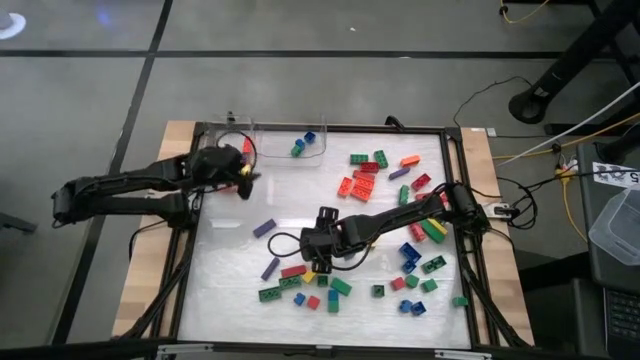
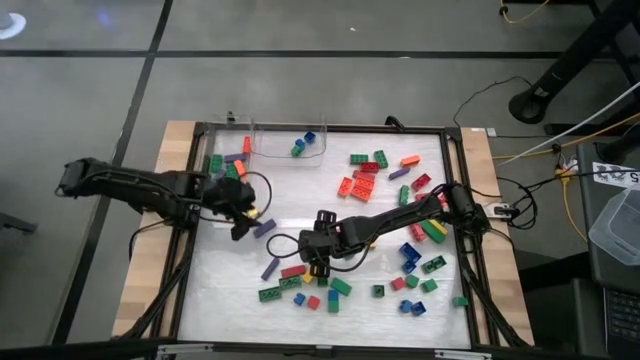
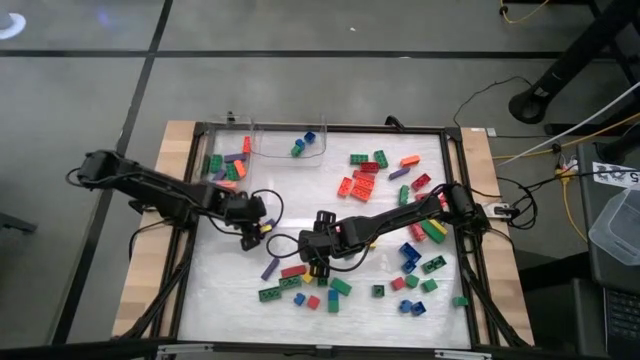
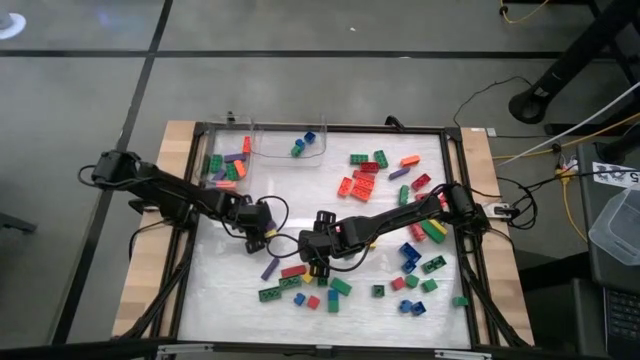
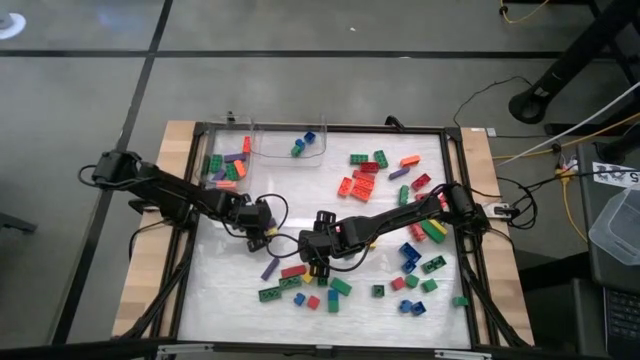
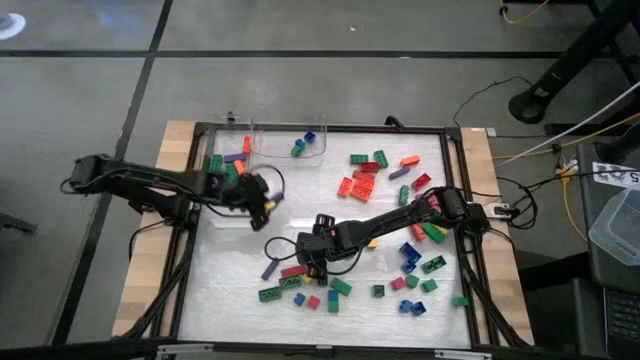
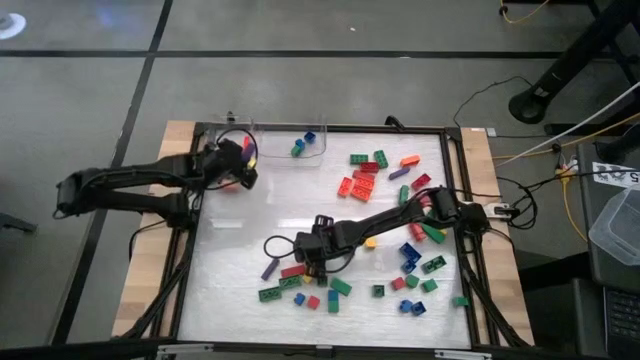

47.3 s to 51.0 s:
Task: Sort blocks by size
Put the large purple block into the left transparent bin

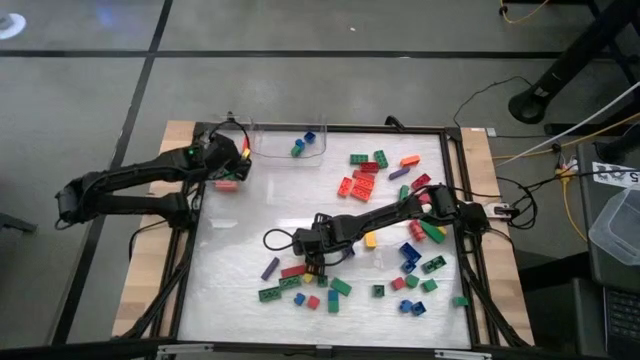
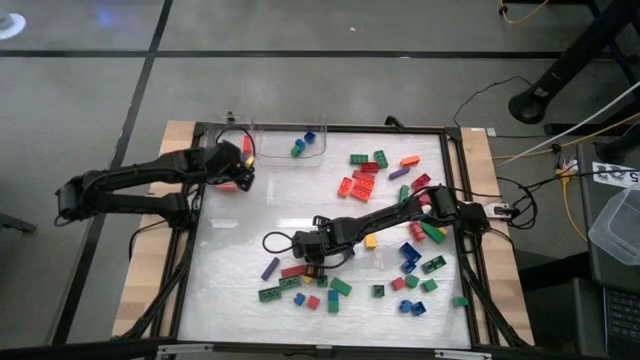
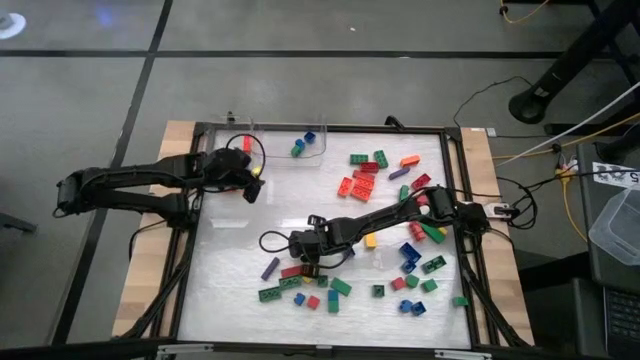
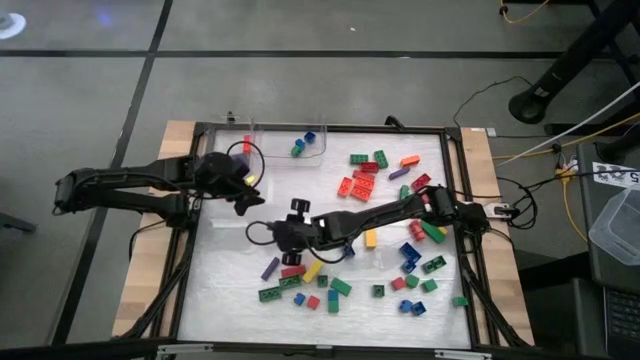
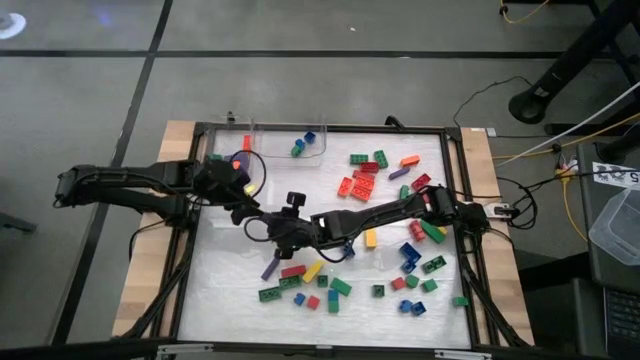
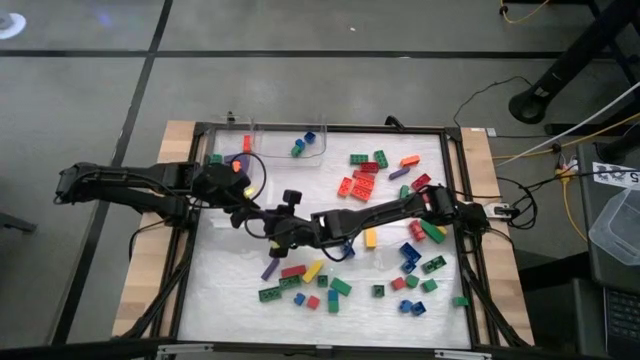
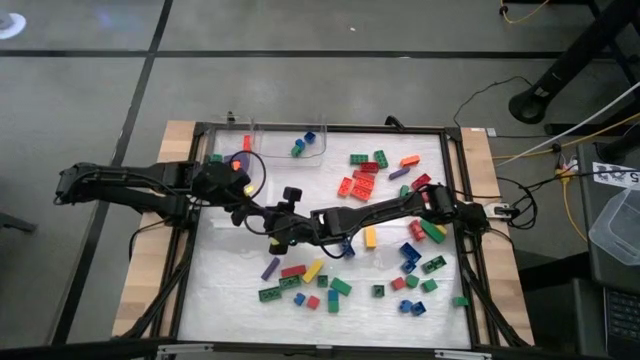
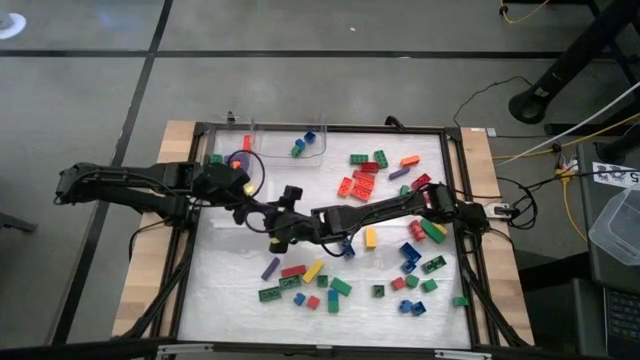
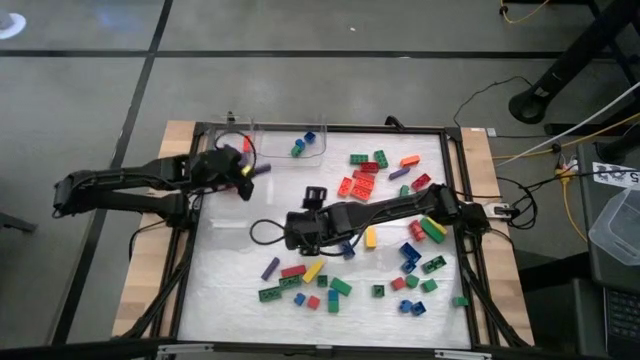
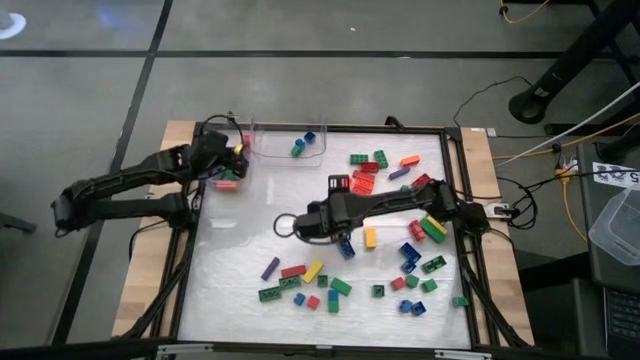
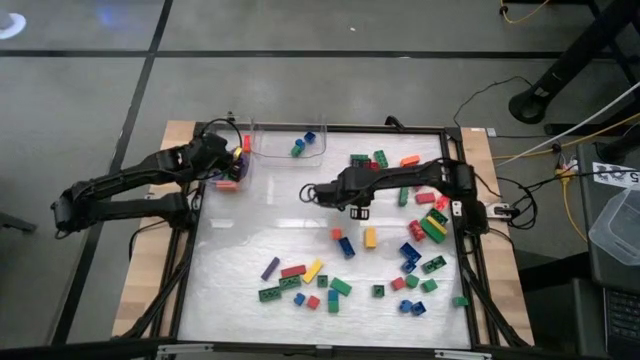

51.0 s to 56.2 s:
Put the large purple block into the left transparent bin

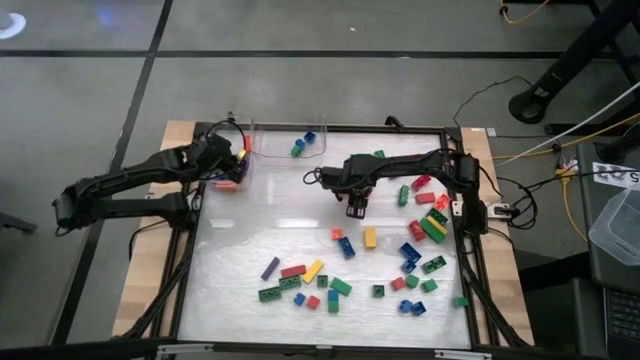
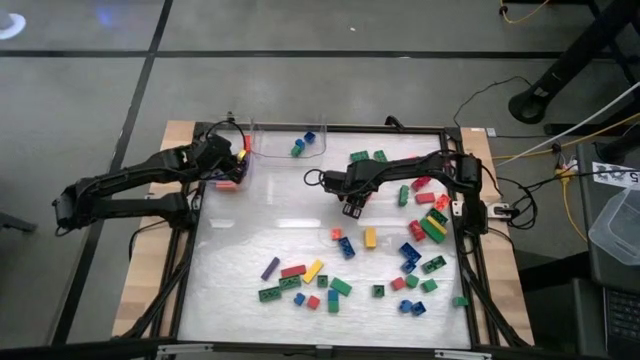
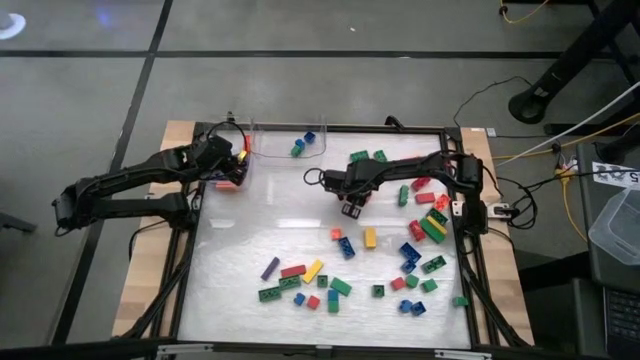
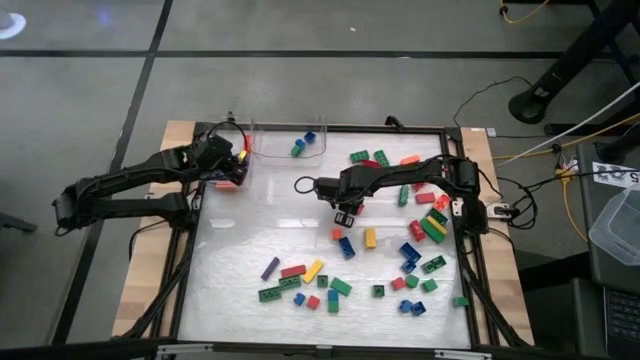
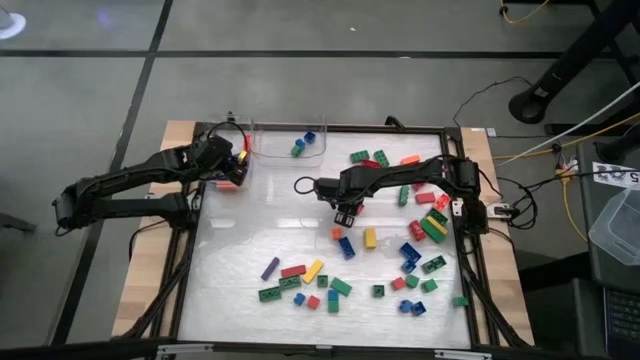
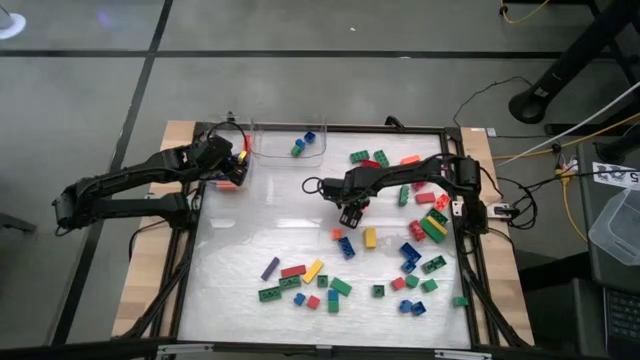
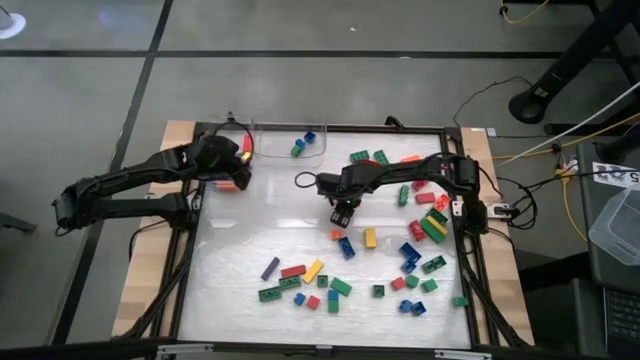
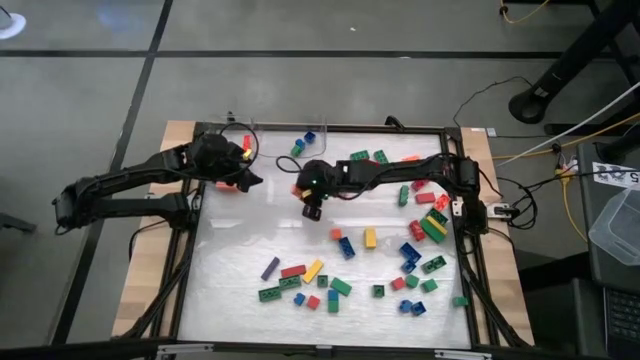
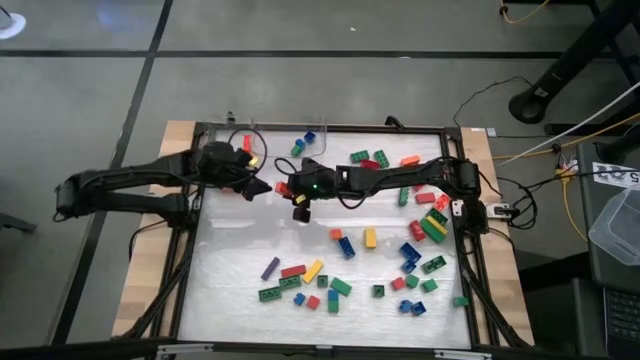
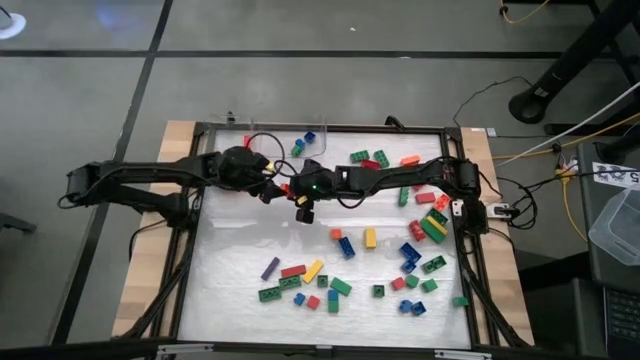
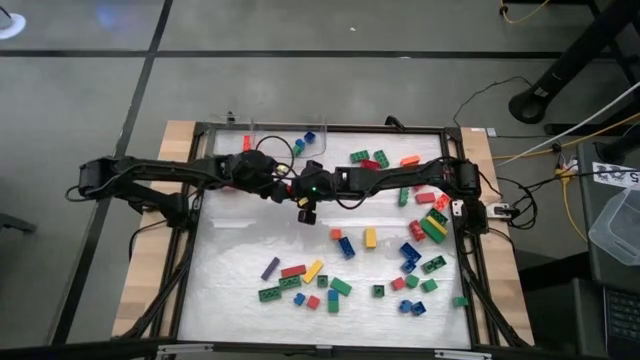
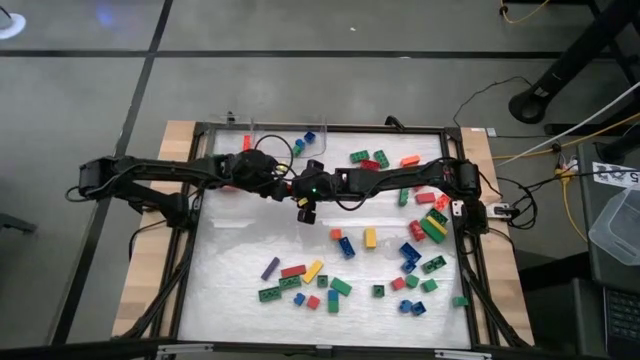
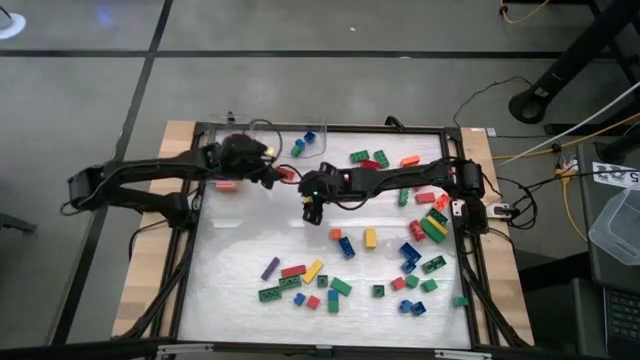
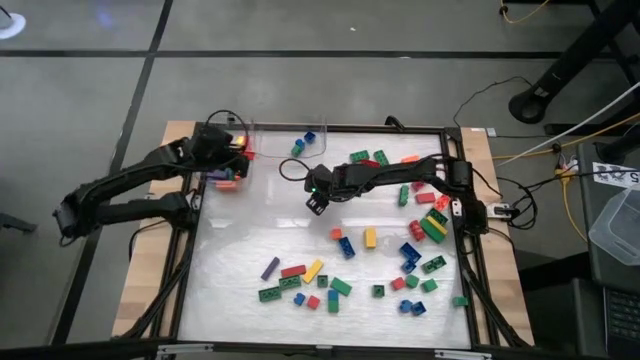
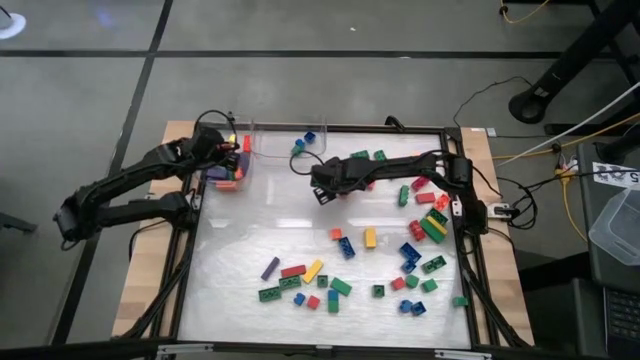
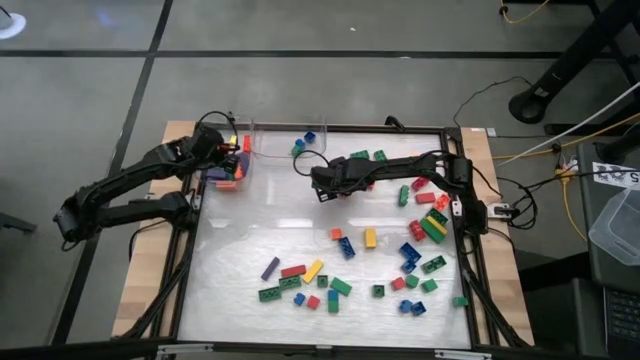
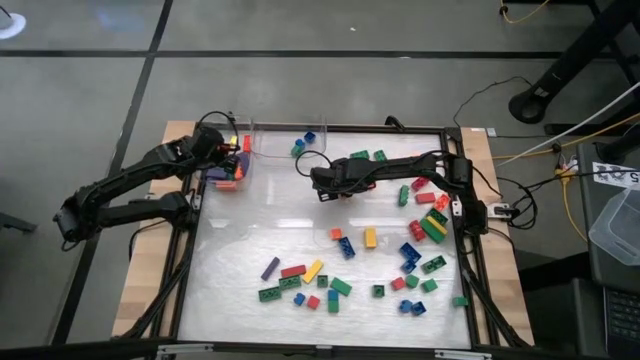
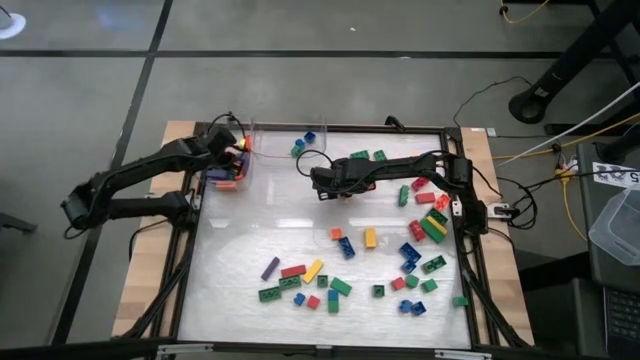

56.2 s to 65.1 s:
Put the large orange game piece into the left transparent bin

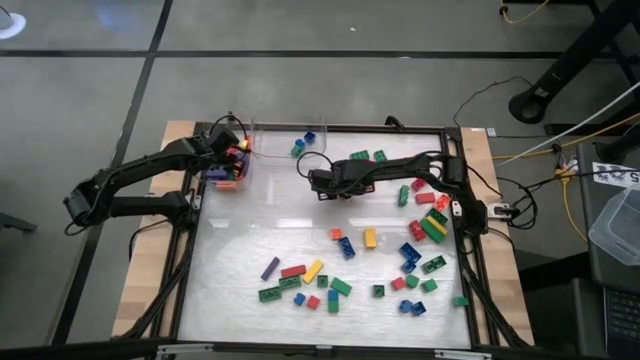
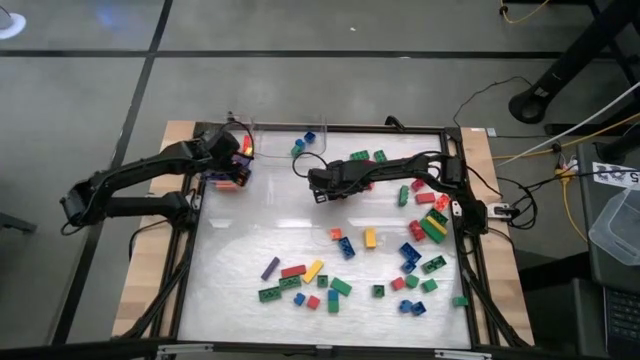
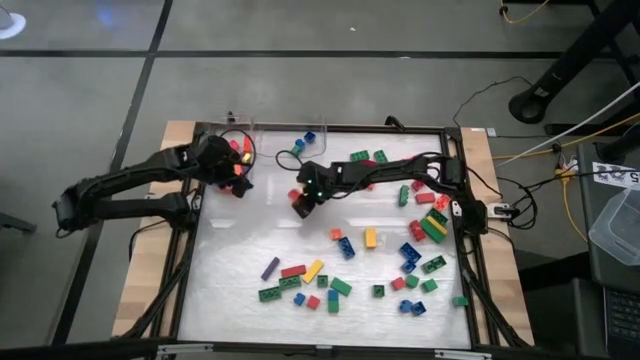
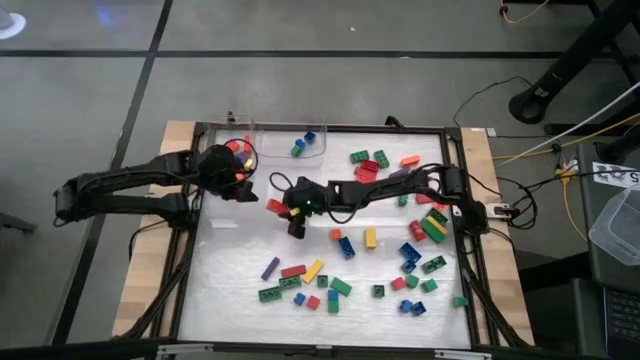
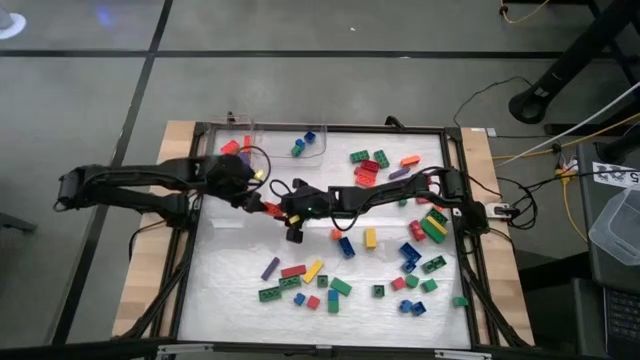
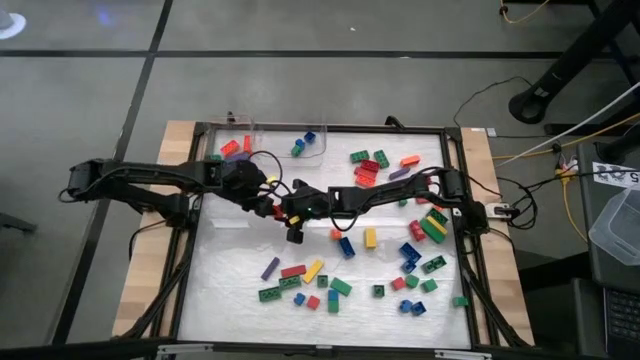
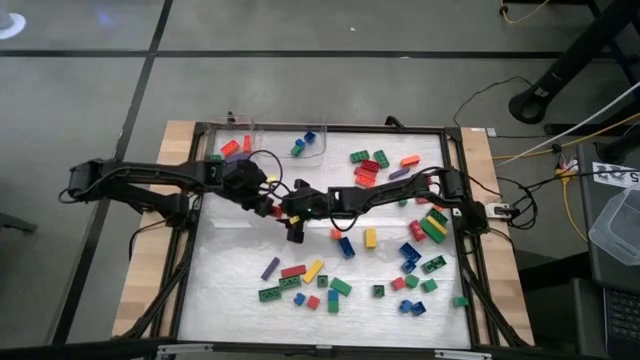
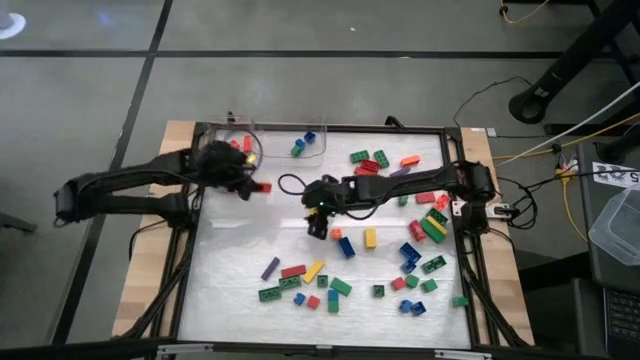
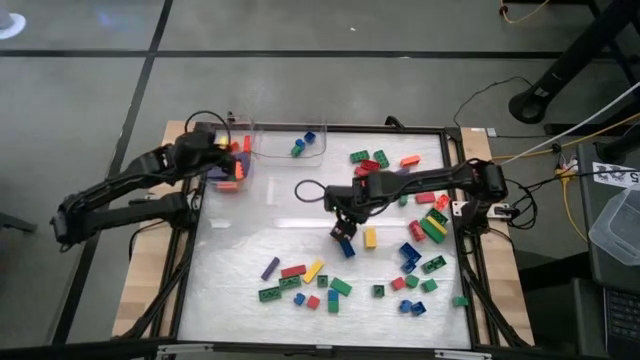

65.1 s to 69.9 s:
Put the large orange game piece into the left transparent bin
